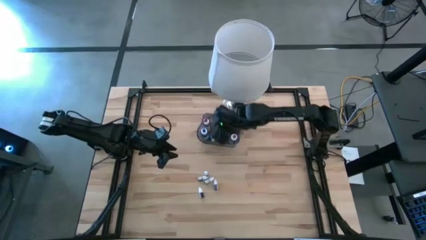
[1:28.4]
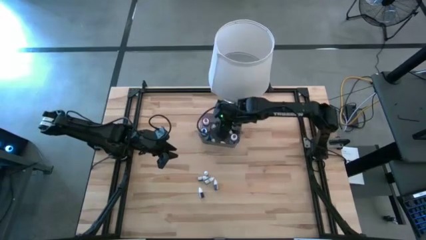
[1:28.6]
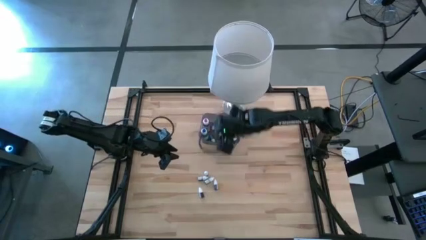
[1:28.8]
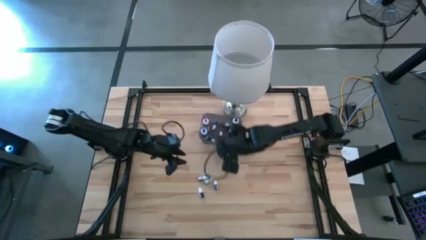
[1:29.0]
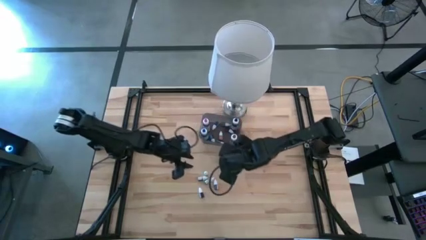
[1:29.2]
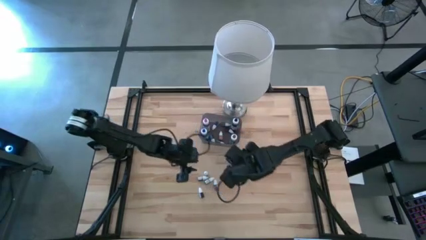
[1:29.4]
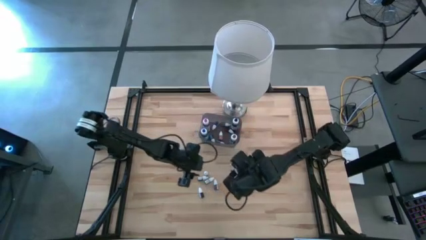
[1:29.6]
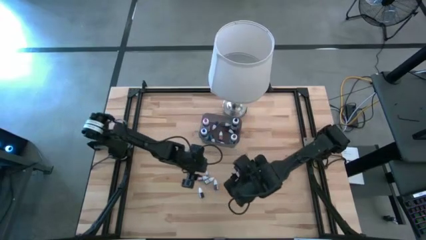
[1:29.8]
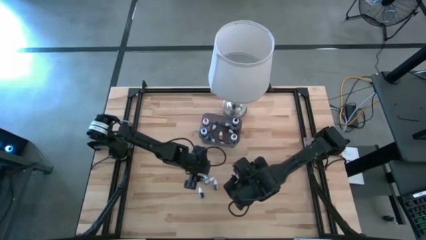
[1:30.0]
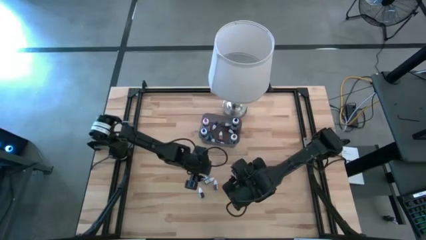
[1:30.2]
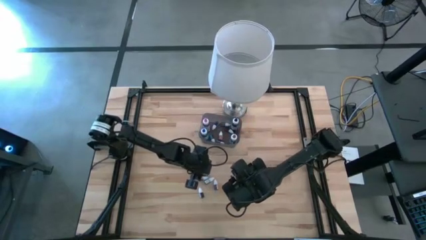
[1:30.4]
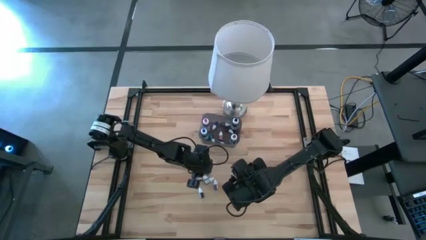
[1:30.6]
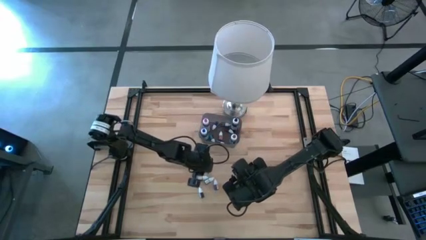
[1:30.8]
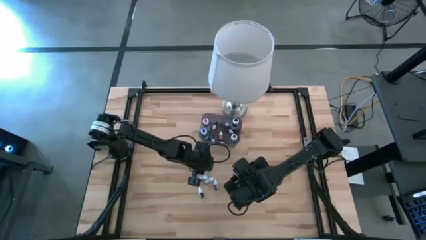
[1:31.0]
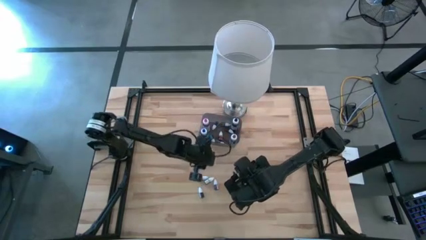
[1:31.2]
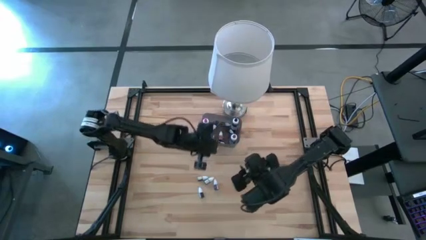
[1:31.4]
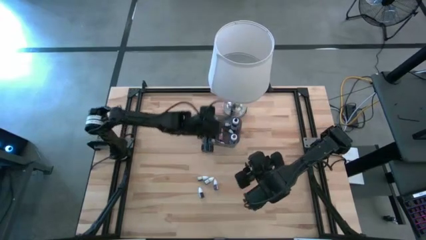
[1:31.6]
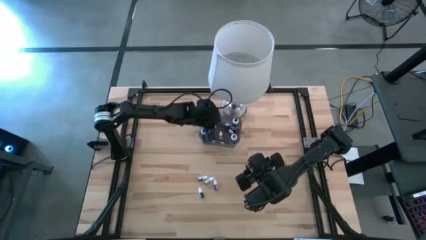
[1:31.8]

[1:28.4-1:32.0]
Task: Pick & Place food coloring
Put the small black food coloring bottle into the black bin

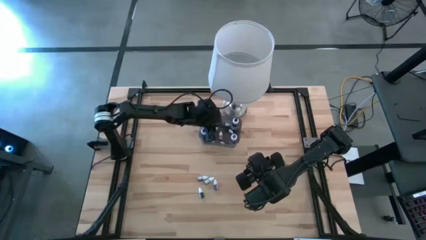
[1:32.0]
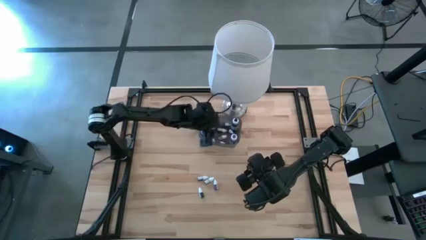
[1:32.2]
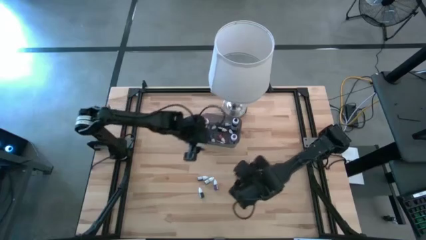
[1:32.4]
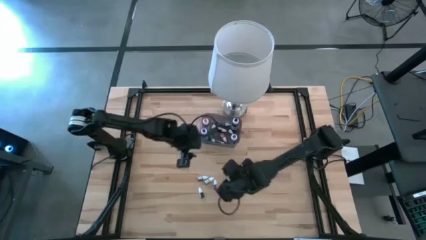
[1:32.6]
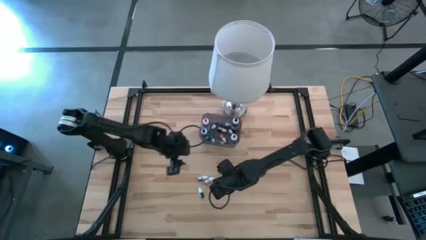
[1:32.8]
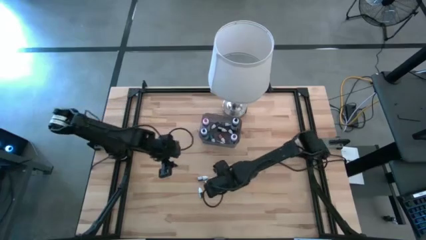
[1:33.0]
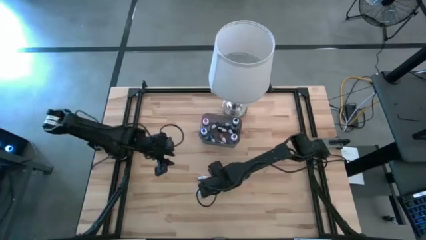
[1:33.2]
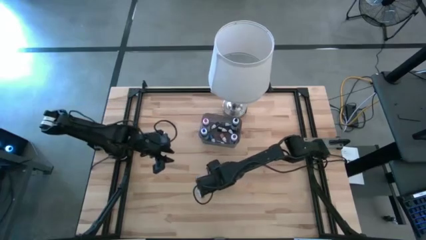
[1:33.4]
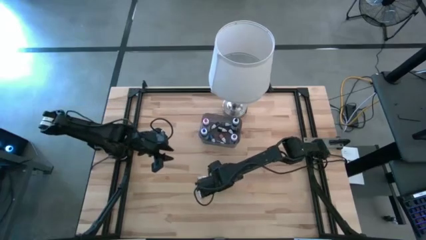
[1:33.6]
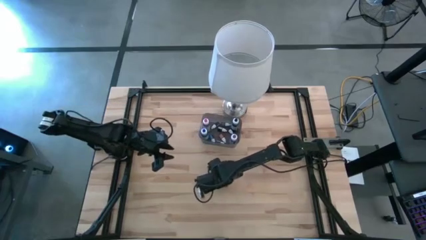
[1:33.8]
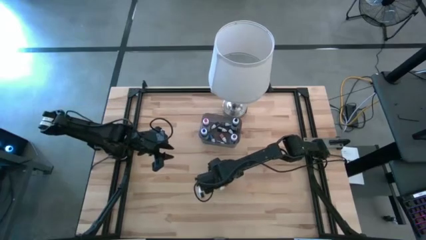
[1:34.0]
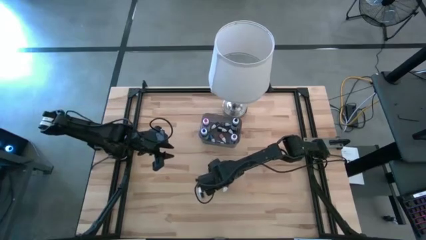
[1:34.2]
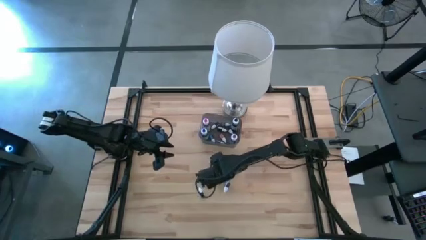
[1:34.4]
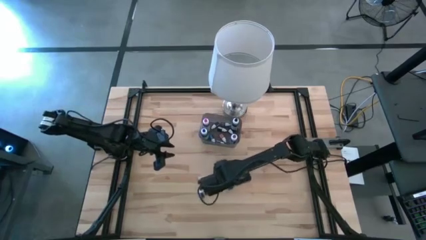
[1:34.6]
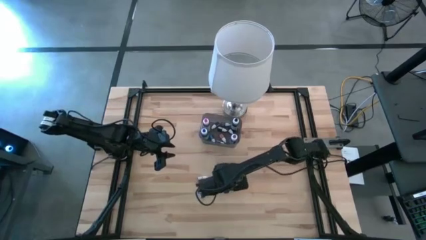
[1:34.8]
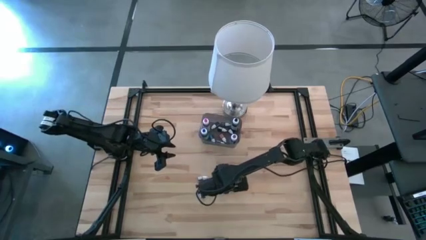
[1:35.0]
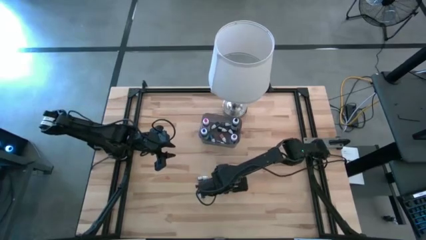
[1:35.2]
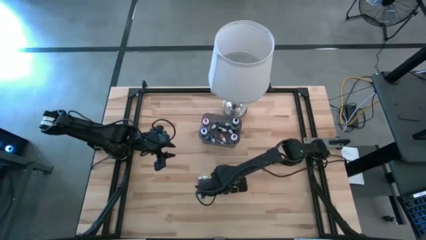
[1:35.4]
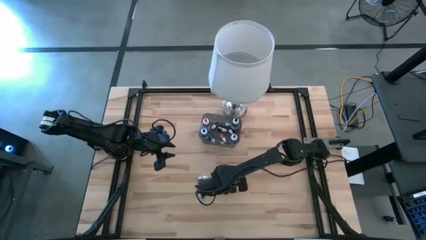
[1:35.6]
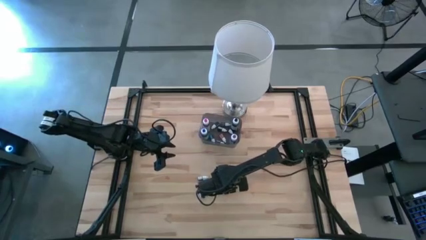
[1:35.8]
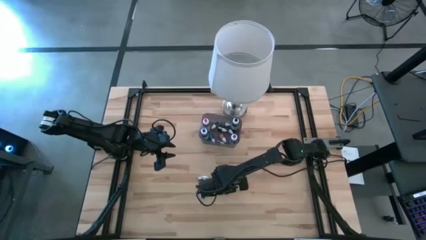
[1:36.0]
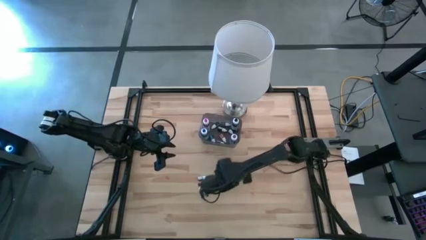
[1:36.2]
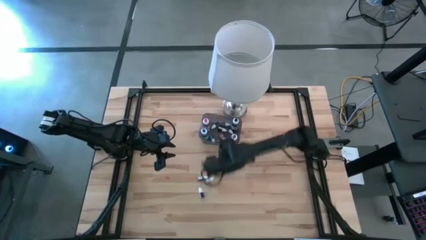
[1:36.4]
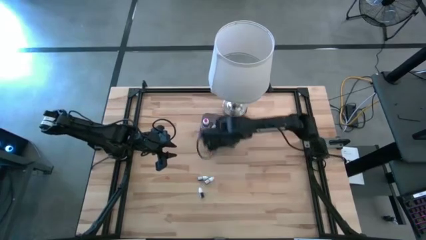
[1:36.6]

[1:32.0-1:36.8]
Put the small purple food coloring bottle into the black bin

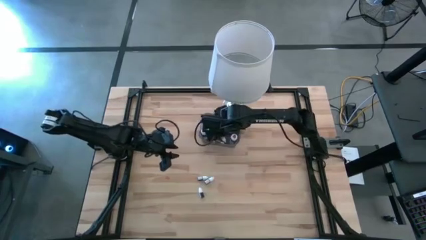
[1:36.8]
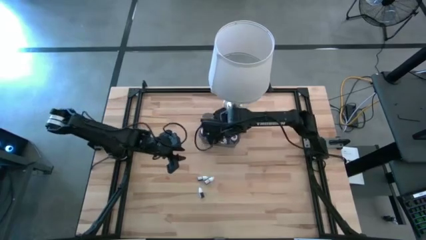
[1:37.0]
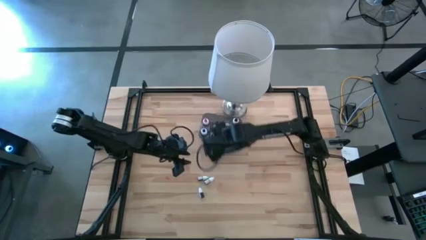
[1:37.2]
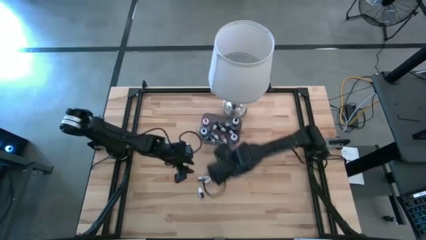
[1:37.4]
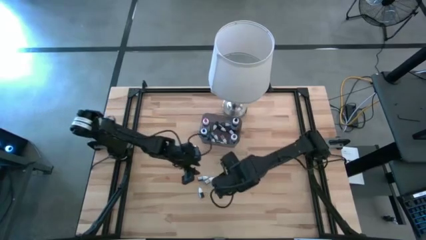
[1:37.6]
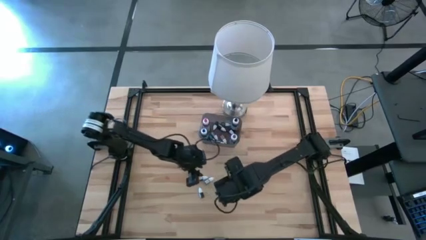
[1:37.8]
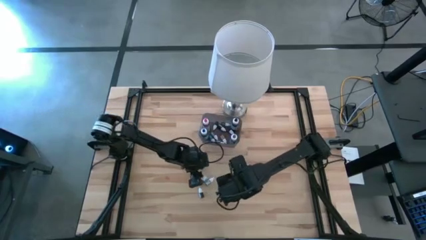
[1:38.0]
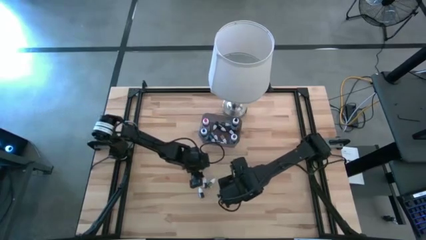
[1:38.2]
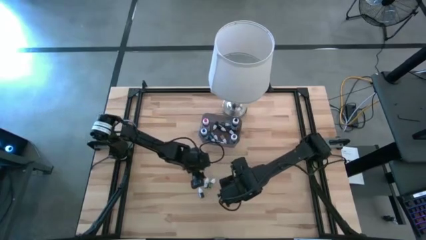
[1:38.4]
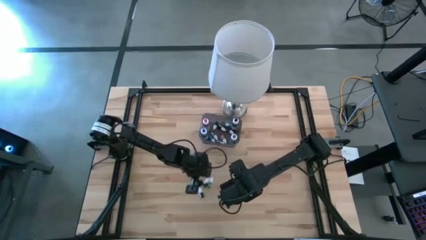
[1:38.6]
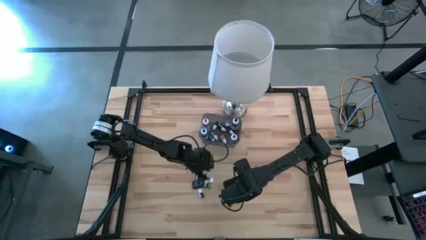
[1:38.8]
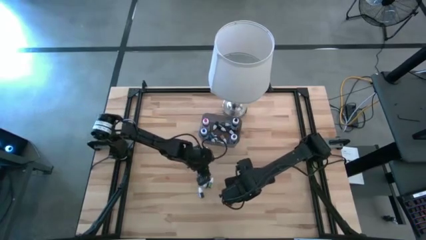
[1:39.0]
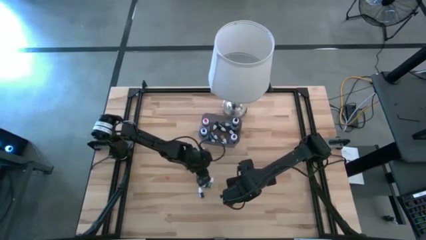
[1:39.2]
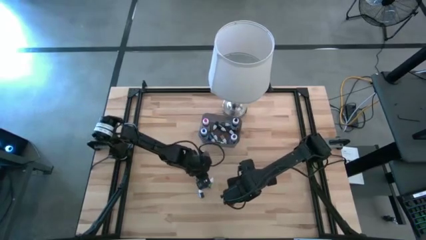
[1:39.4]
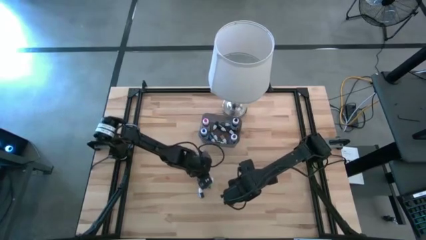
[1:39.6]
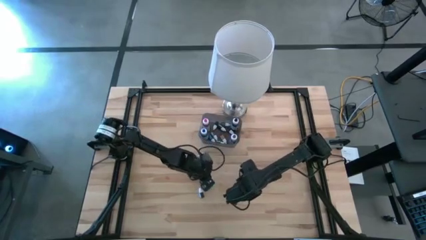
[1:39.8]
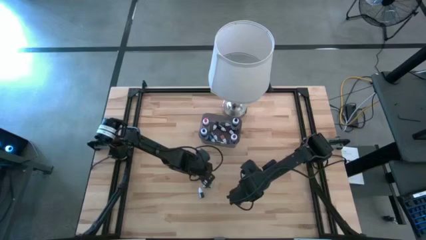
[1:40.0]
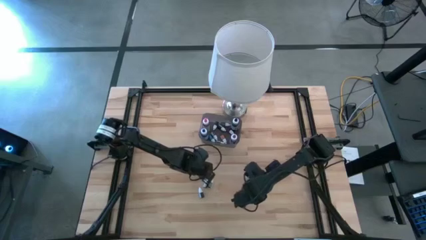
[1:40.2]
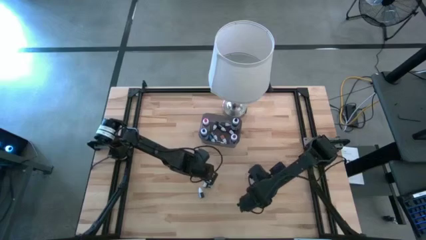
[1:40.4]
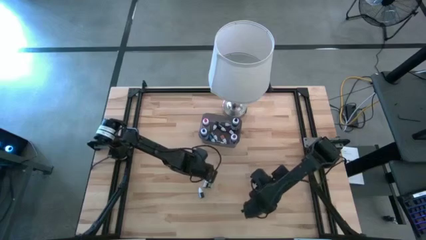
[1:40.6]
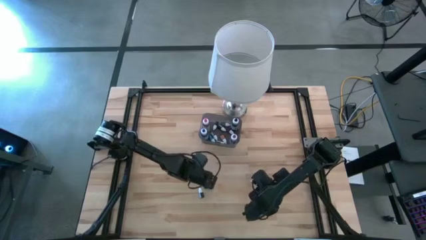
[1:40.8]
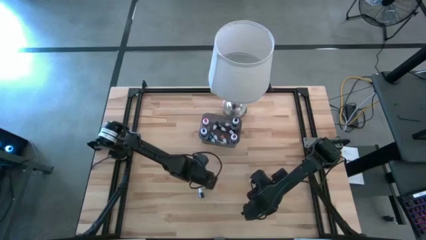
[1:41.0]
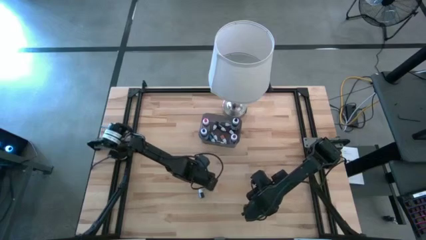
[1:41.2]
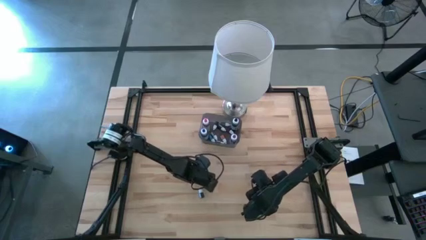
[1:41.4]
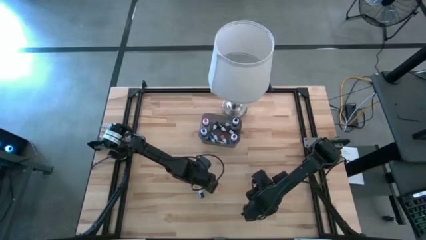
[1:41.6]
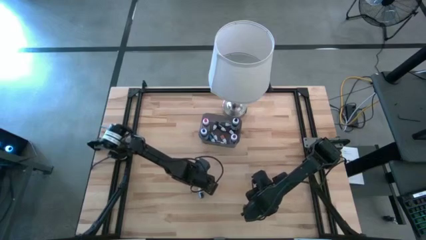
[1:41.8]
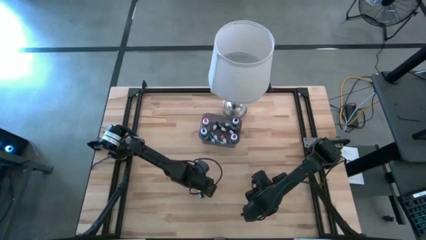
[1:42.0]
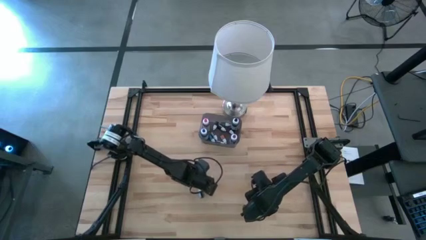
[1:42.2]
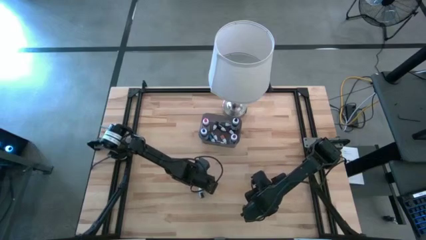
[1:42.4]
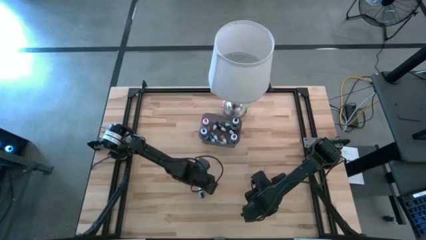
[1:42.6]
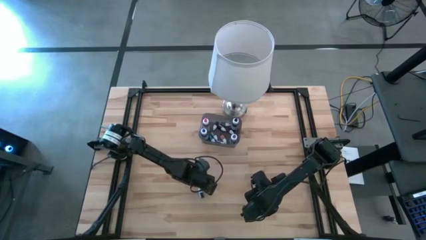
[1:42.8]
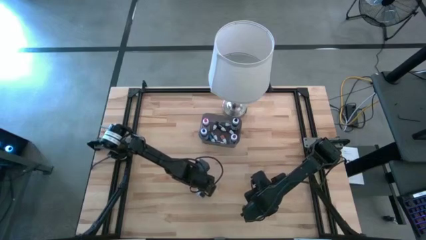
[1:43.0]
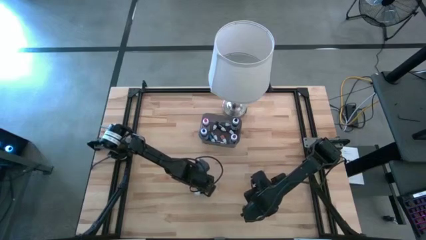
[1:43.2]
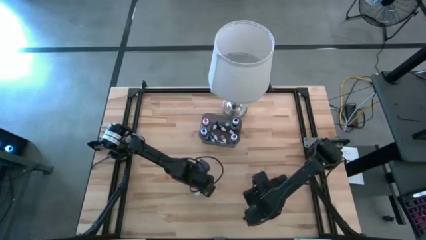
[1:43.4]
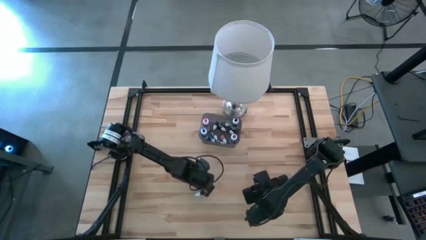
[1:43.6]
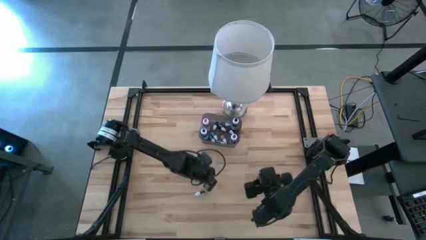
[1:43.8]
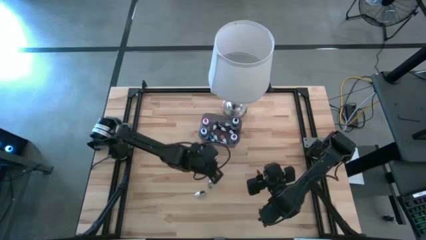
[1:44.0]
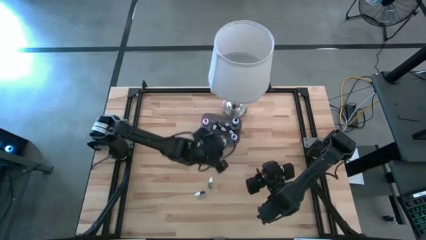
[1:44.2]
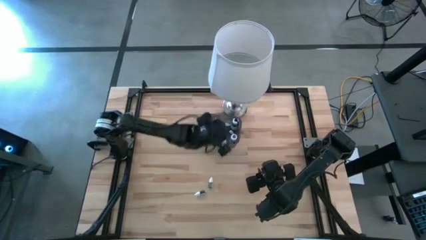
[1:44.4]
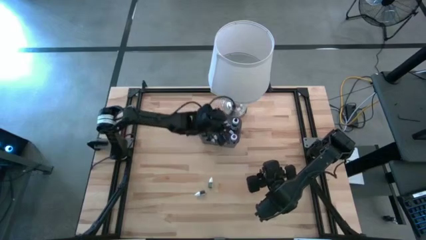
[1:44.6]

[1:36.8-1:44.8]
Put the small green food coloring bottle into the black bin
